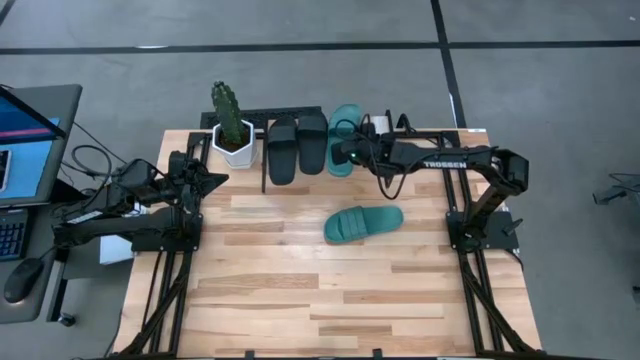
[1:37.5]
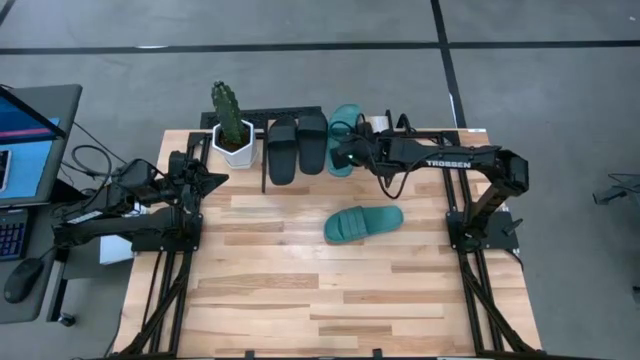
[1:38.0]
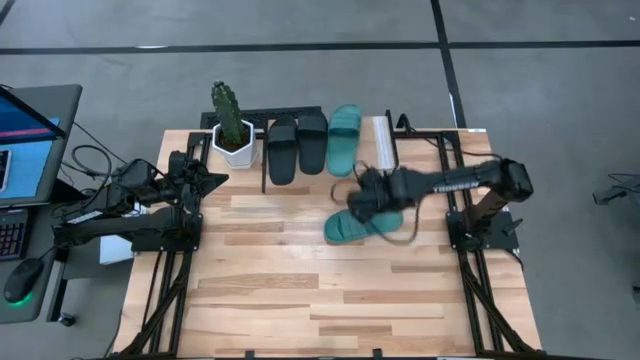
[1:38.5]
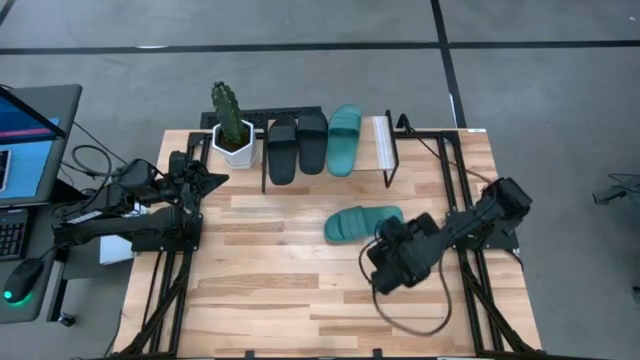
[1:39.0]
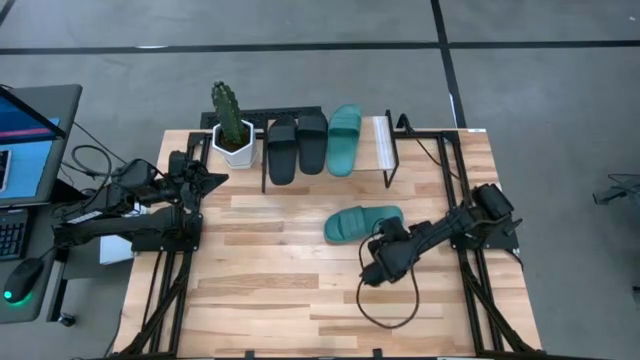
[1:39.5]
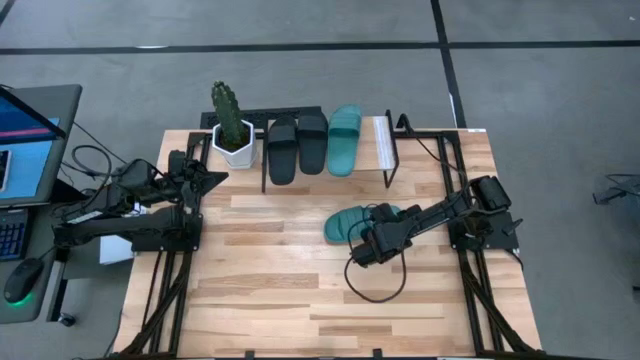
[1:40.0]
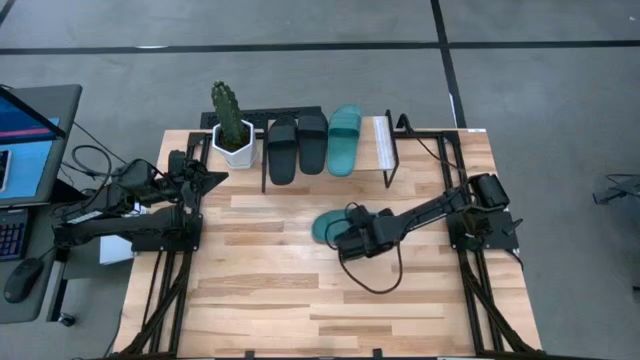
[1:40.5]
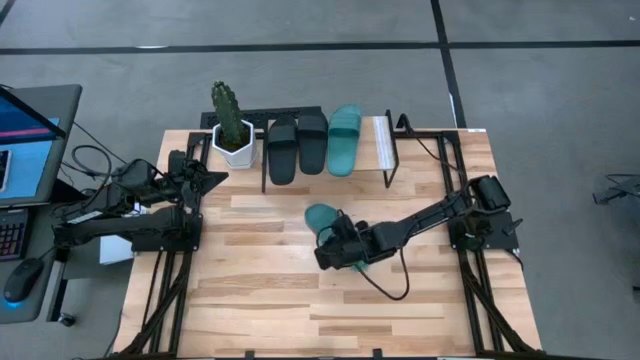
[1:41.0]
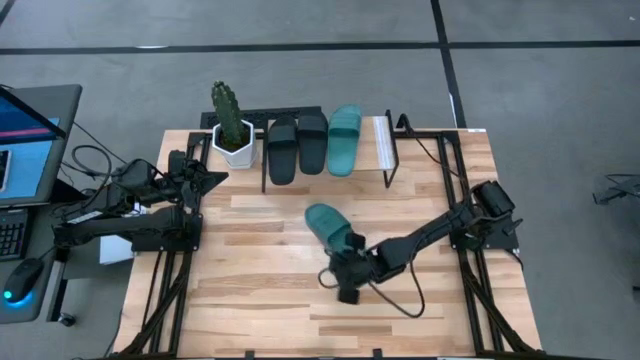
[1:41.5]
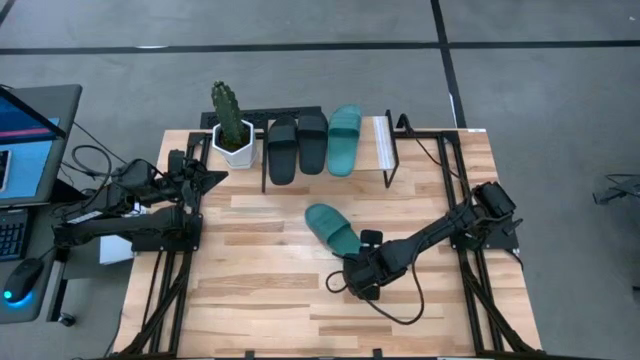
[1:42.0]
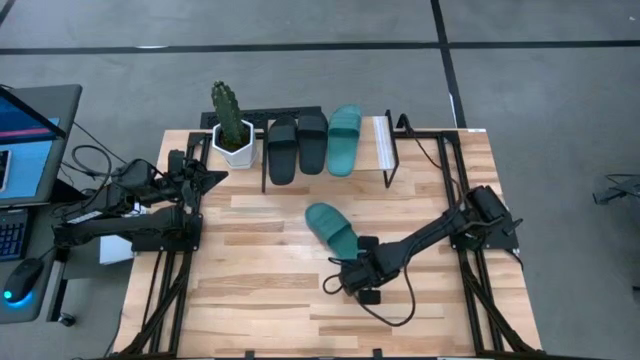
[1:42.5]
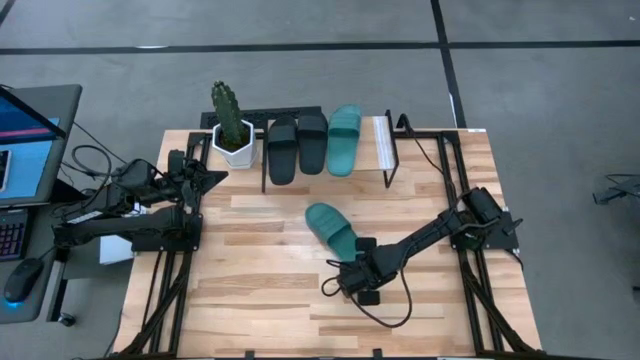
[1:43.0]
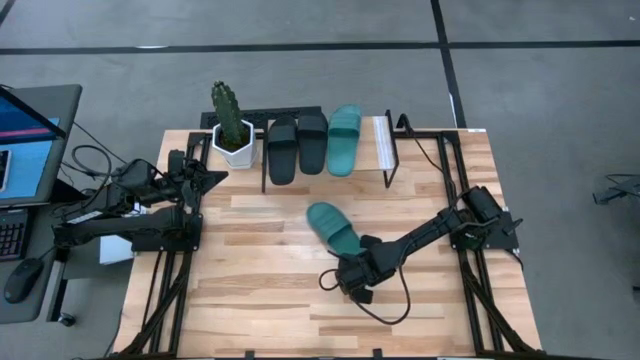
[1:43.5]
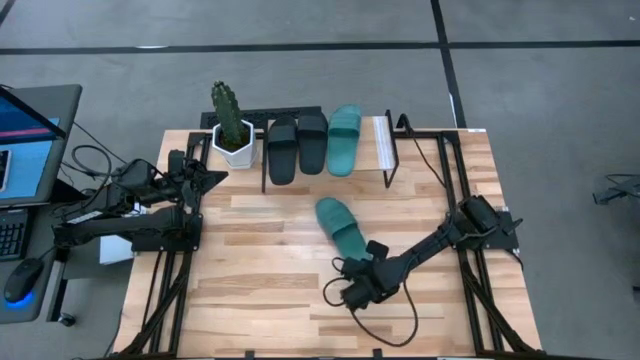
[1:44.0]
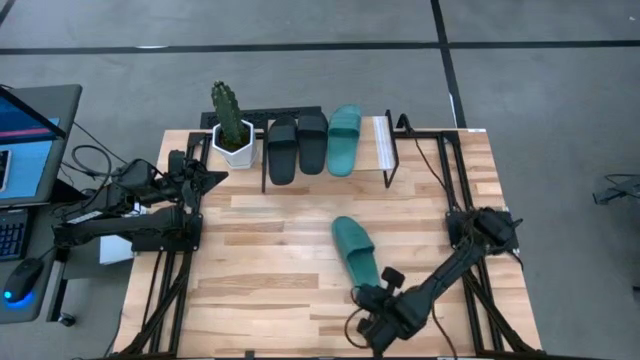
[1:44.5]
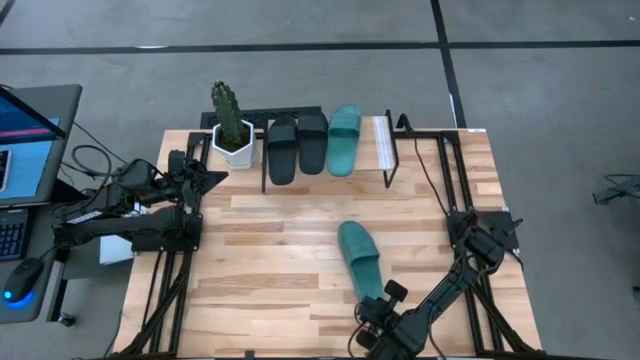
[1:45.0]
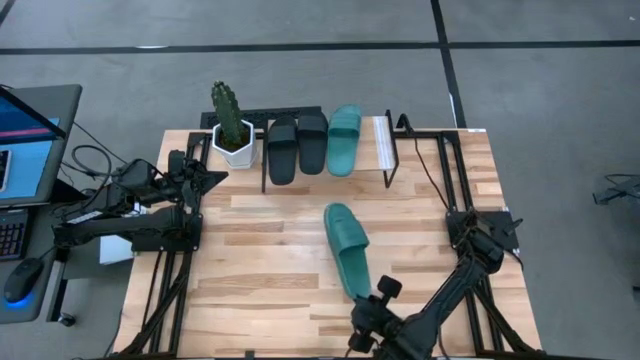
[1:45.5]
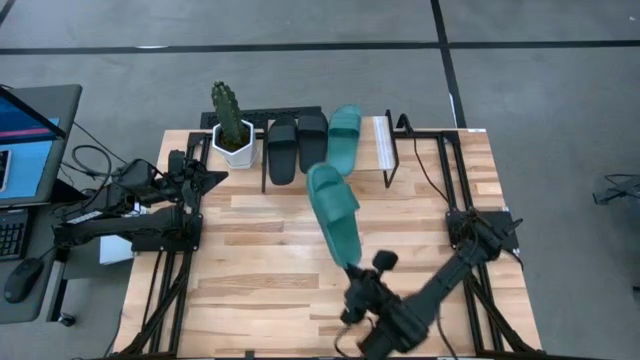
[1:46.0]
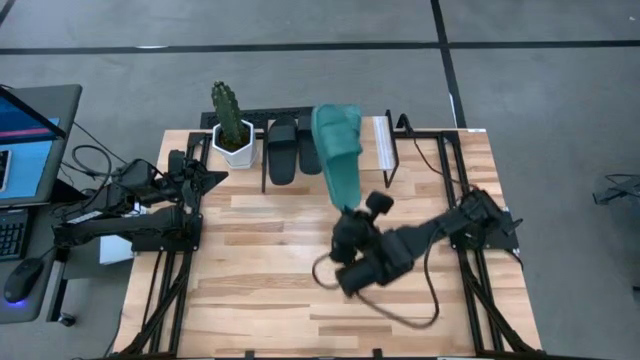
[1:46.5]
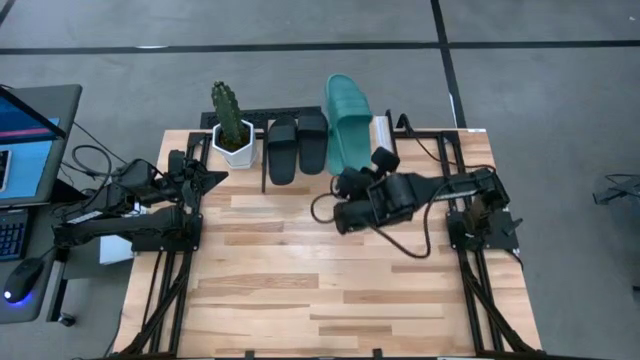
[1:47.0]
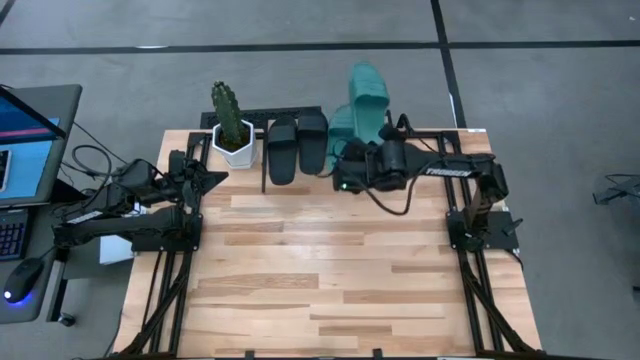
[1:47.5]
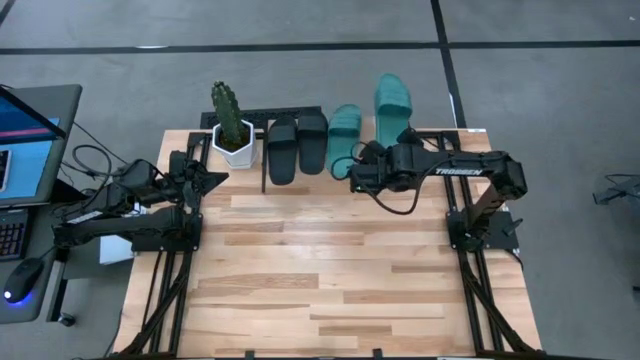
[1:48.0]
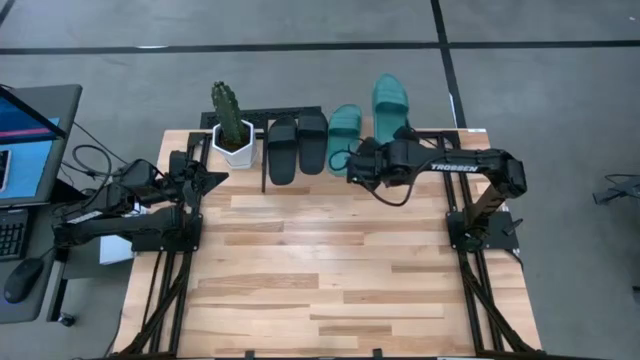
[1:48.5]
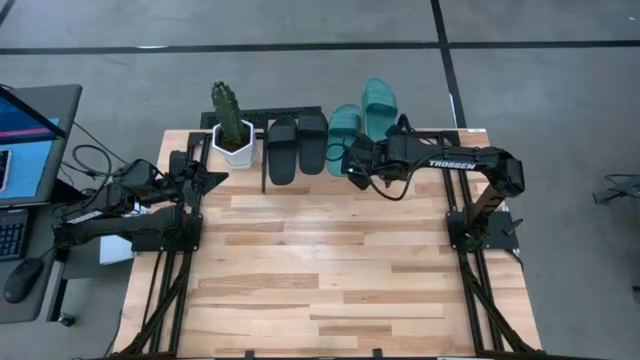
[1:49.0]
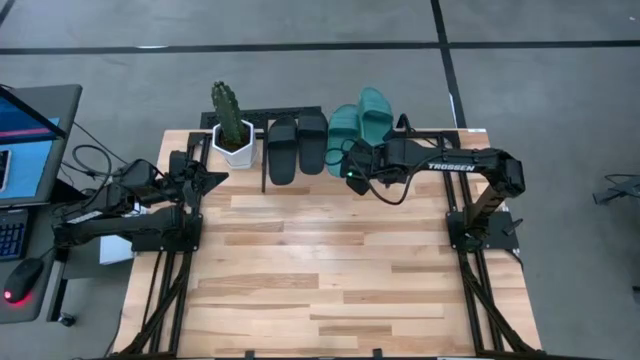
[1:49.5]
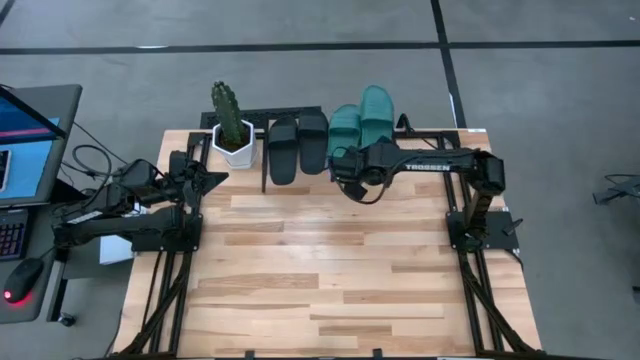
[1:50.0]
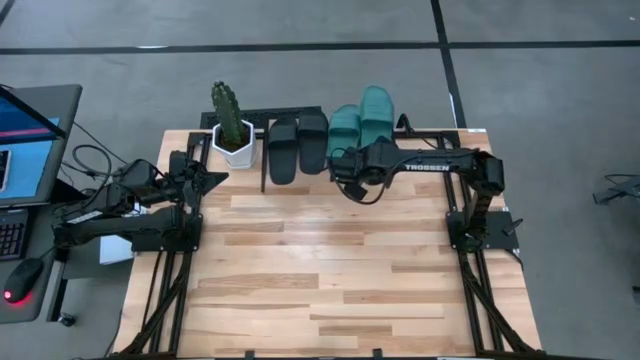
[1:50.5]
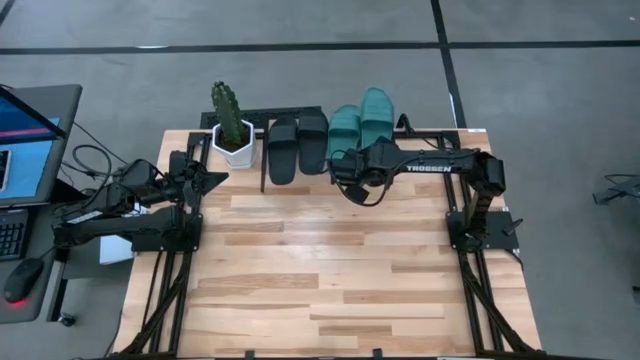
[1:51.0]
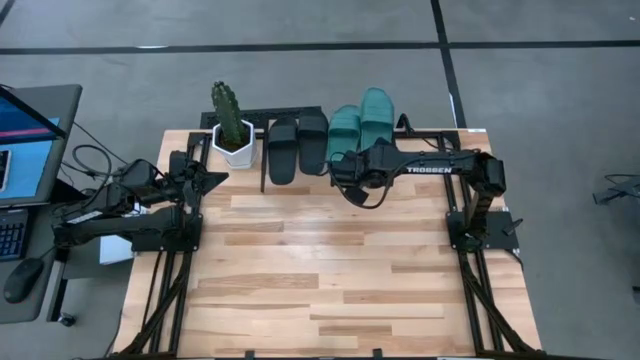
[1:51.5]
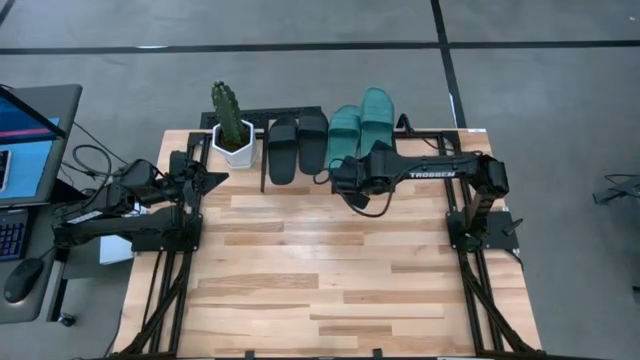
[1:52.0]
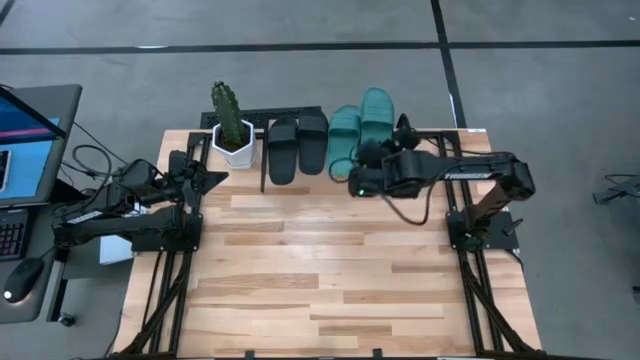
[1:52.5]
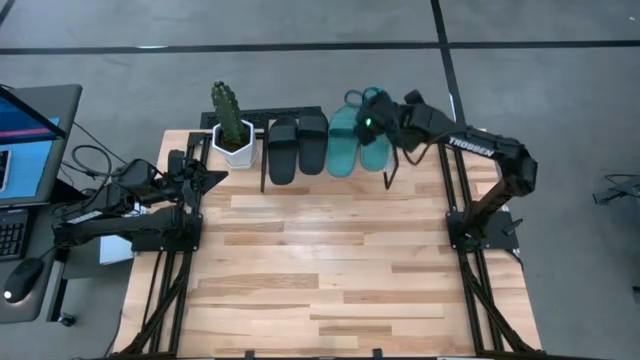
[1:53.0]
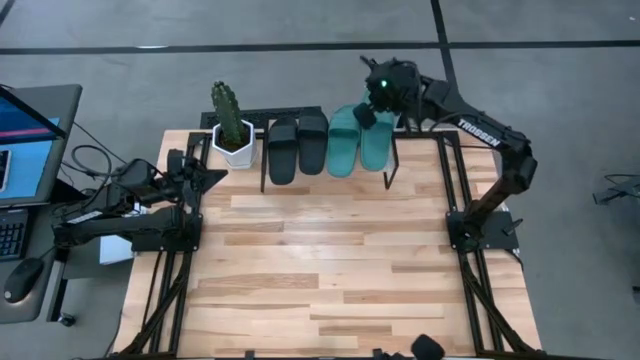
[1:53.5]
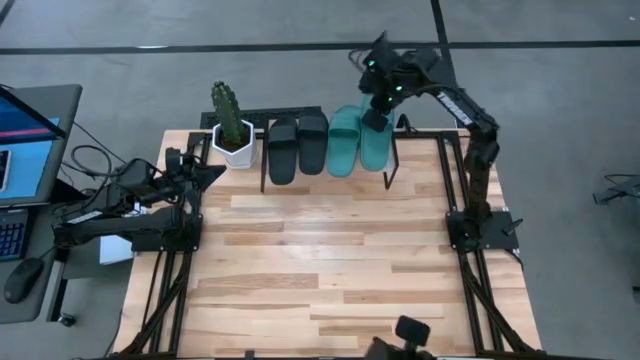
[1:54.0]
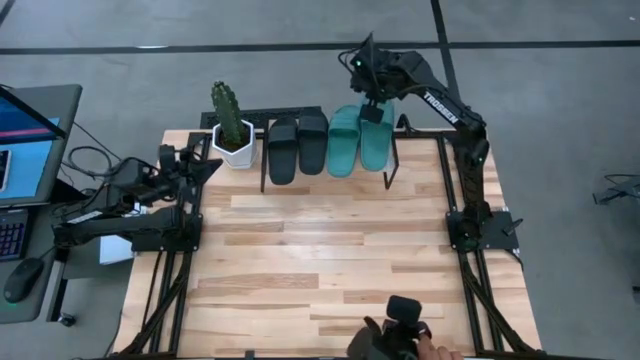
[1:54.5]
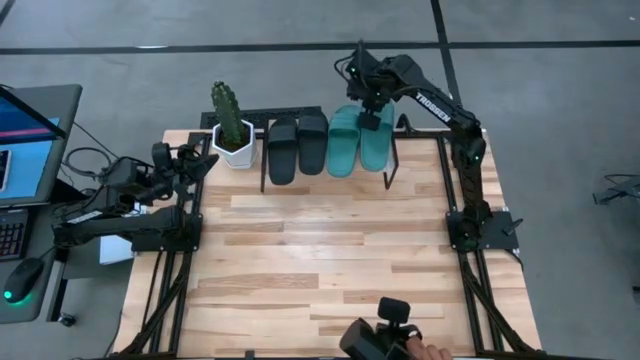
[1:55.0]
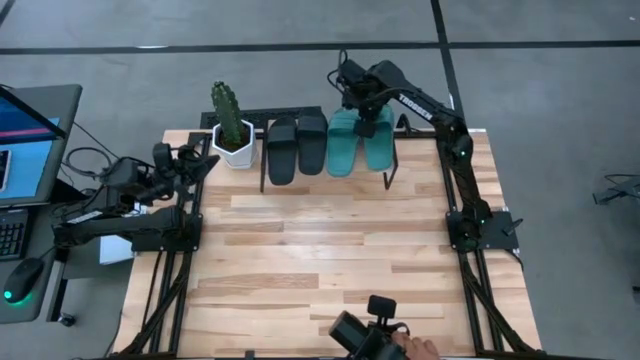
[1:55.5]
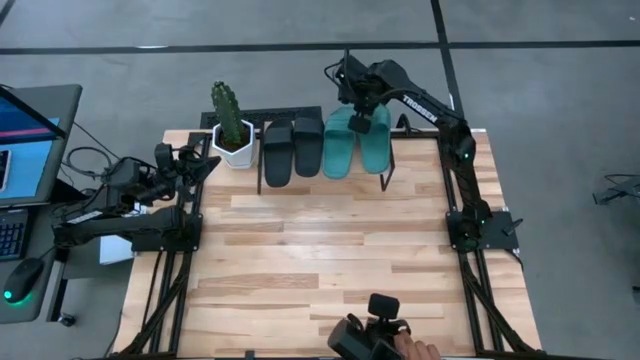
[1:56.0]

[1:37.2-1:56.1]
Task: Pick and place slides into the shelf
Put the green slide on the shelf

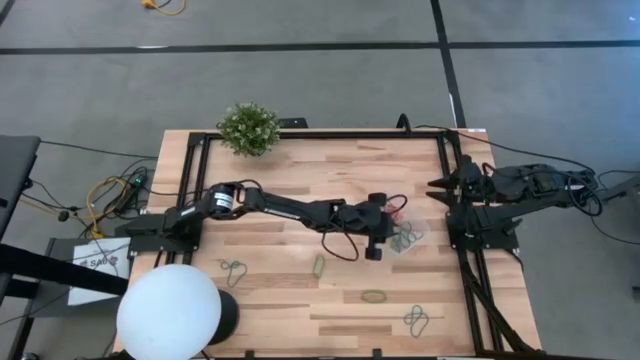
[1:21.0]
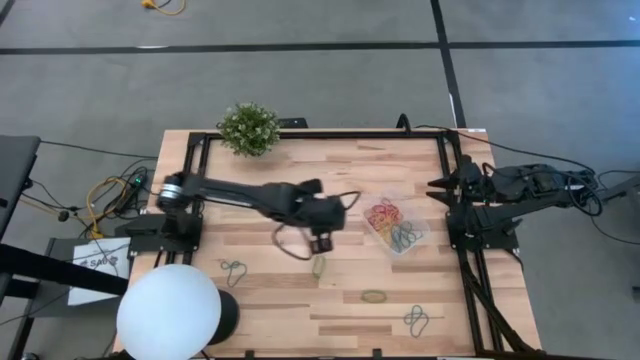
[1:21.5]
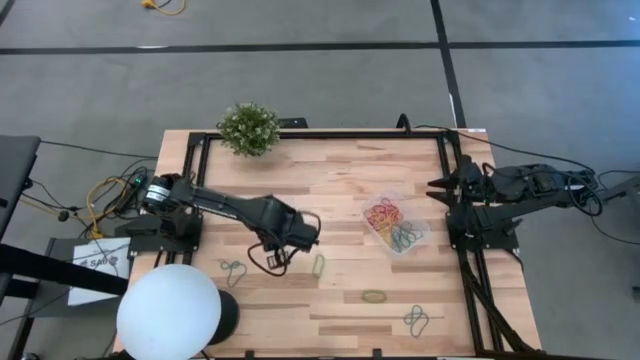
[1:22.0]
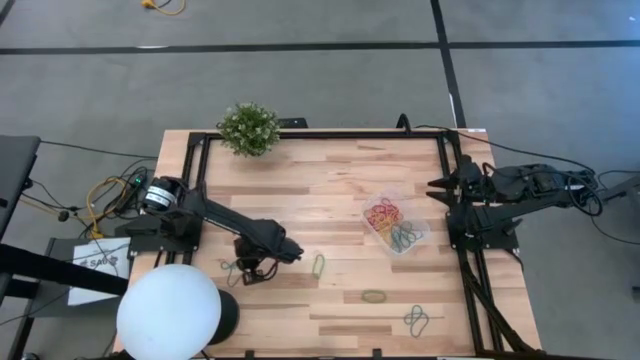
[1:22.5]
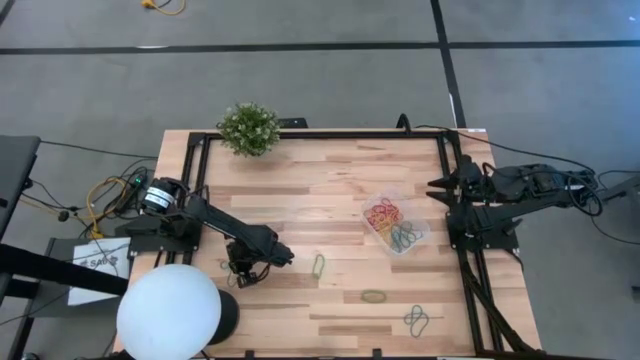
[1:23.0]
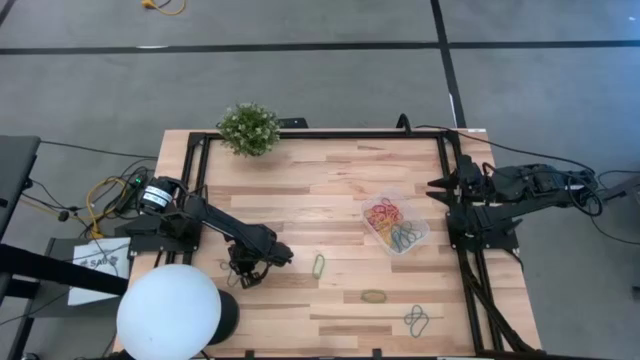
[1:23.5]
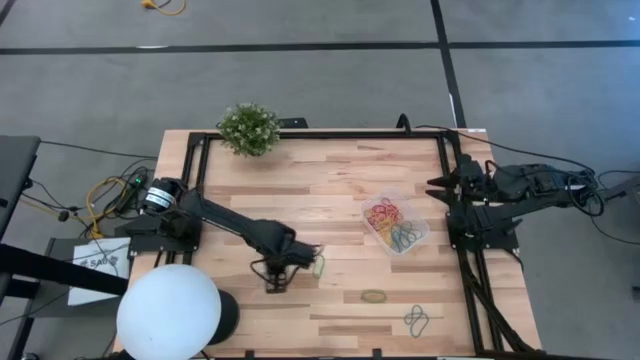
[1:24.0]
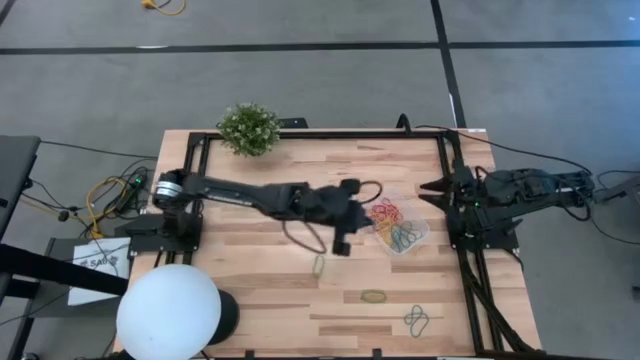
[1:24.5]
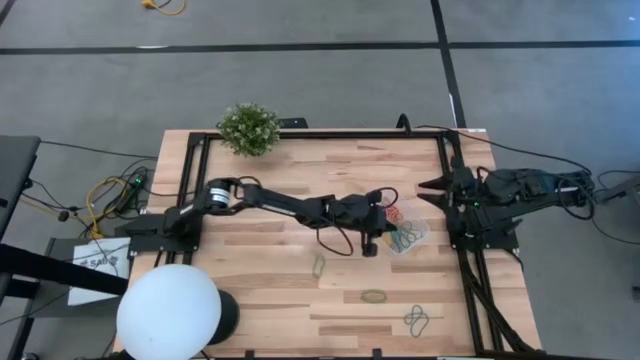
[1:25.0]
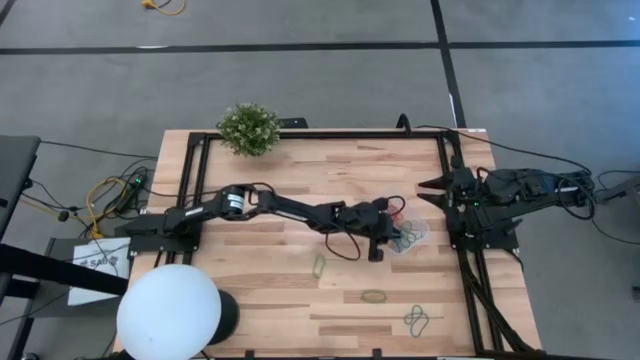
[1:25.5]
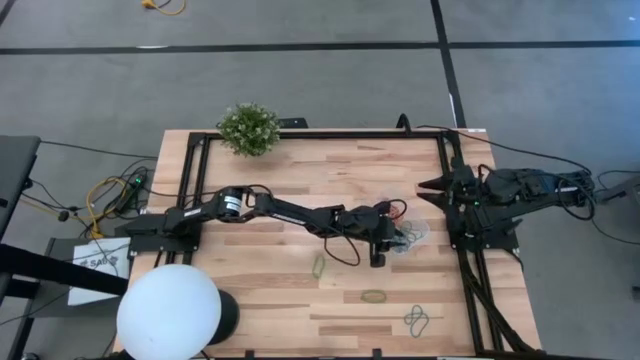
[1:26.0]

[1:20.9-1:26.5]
Task: Pick and place items into bin
Put the blue rubber band into the transparent bin
